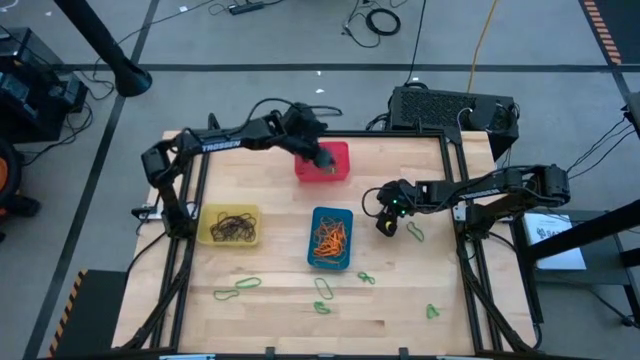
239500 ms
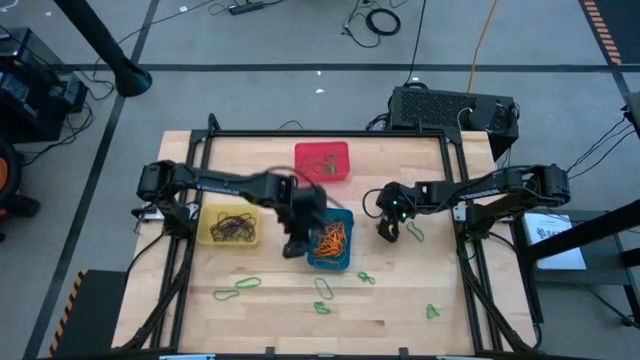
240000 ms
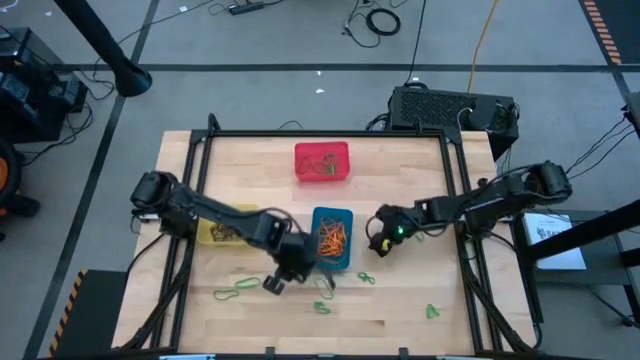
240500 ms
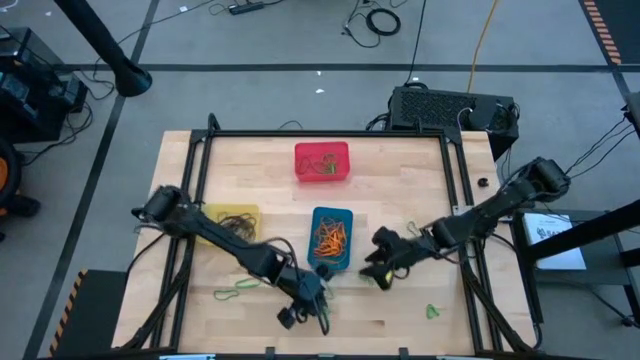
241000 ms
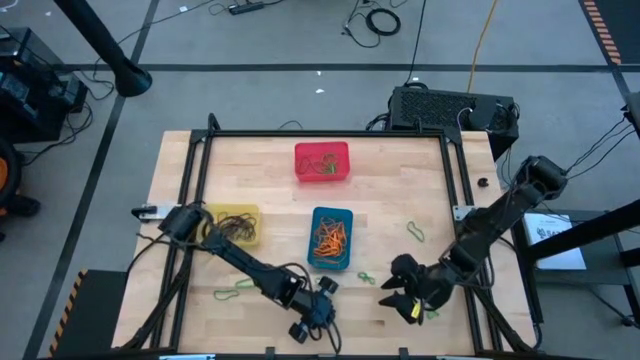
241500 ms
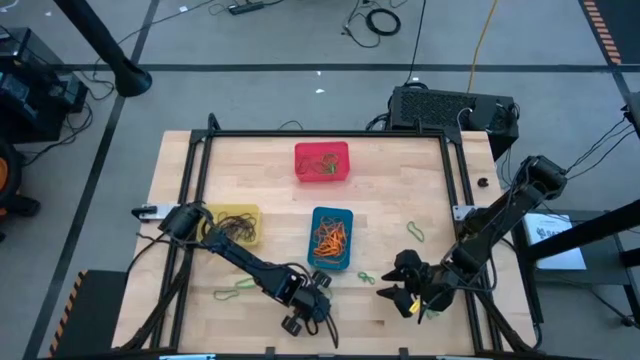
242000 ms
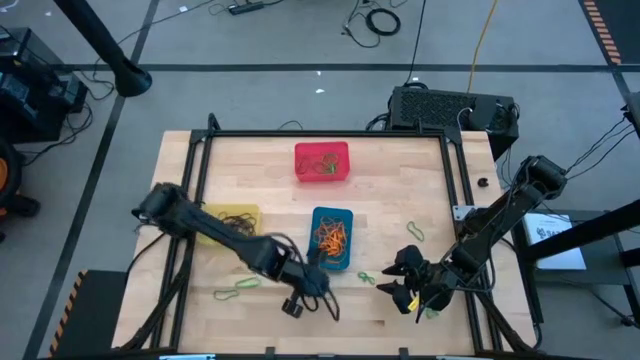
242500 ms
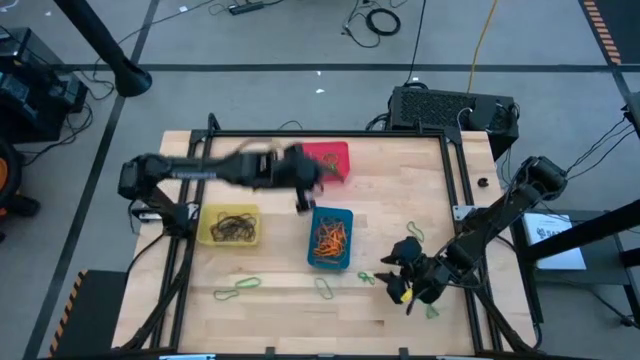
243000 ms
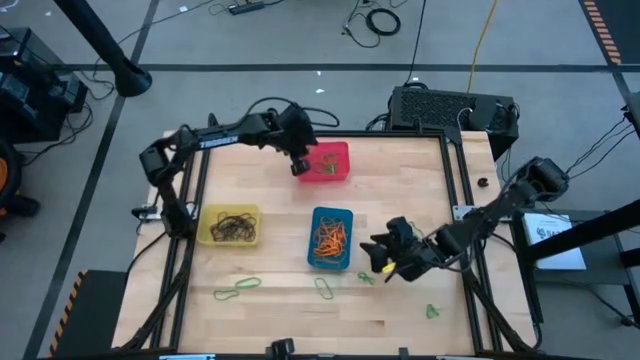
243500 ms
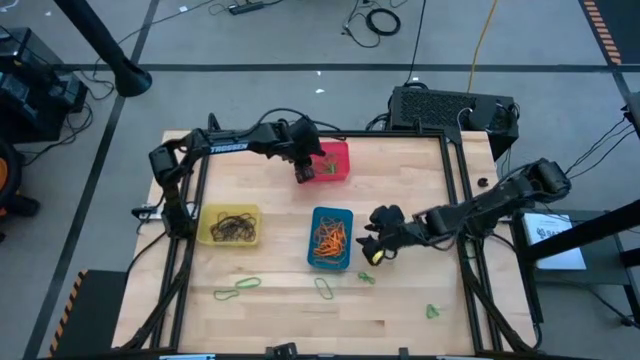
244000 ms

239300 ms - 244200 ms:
Task: Sort rubber bands into baskets
Put the green rubber band into the red bin

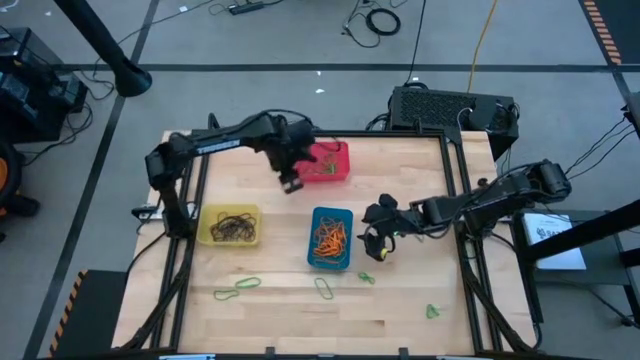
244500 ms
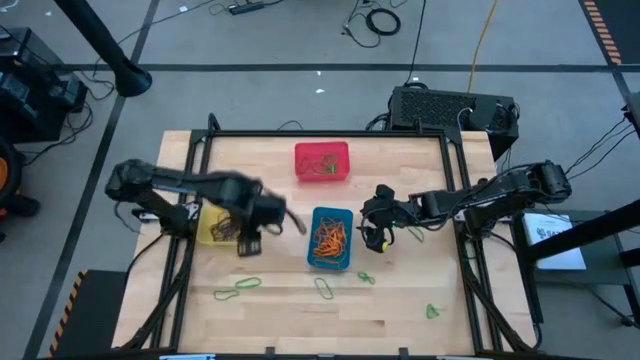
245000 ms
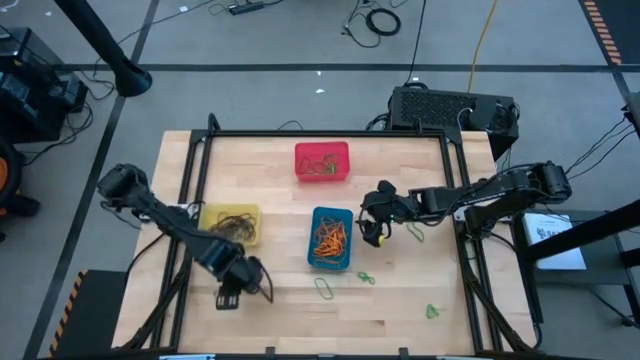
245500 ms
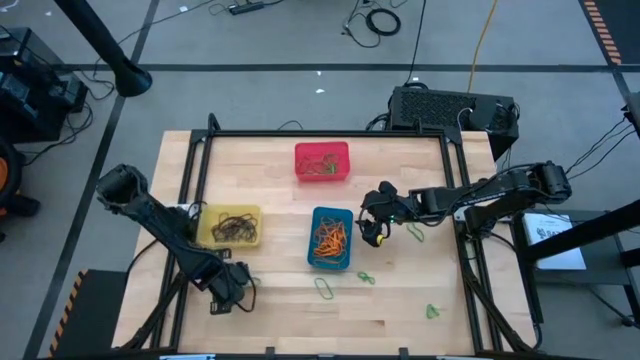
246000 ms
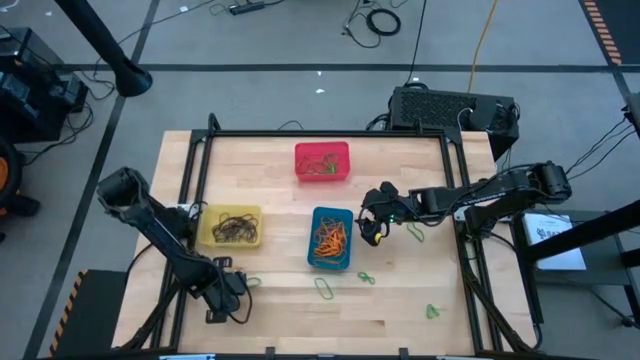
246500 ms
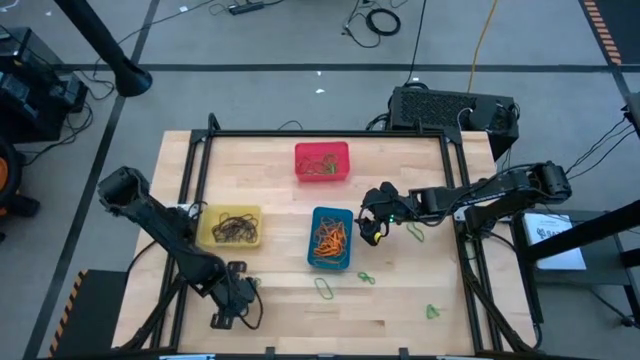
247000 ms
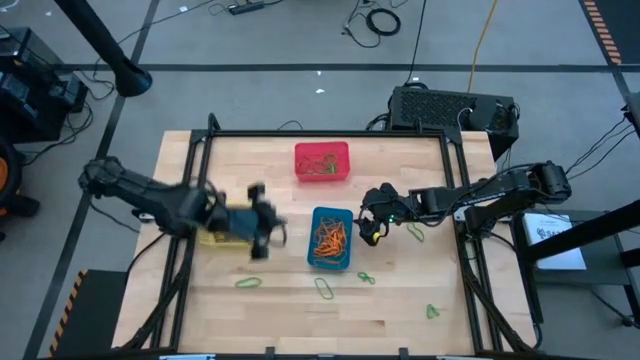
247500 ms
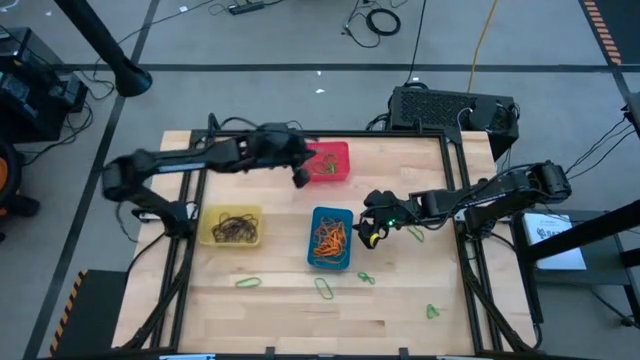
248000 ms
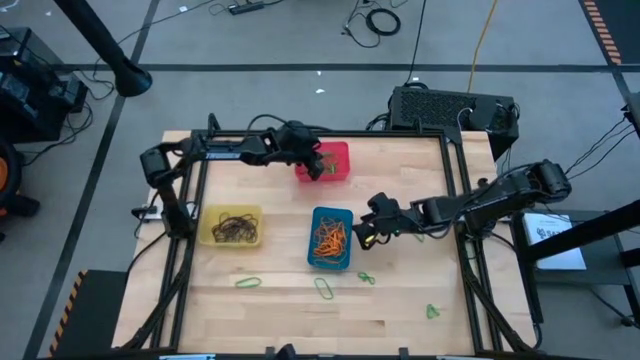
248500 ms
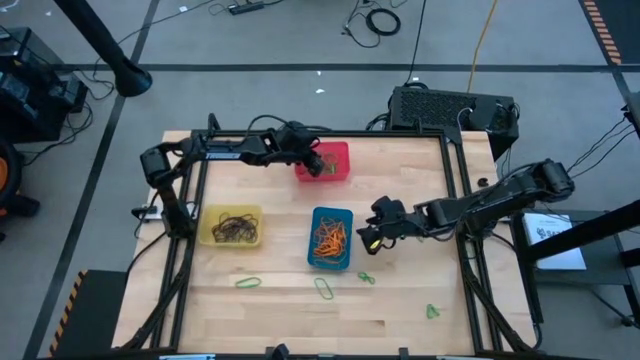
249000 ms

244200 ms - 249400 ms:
Put the green rubber band into the red bin

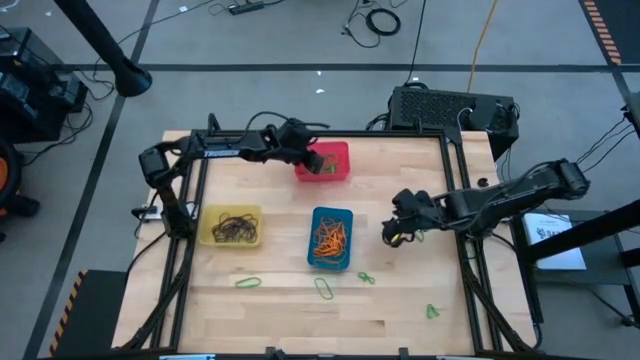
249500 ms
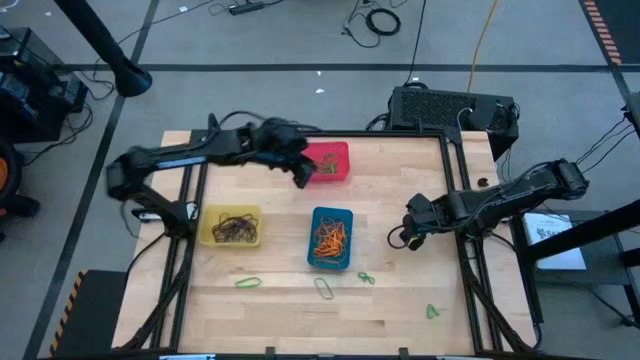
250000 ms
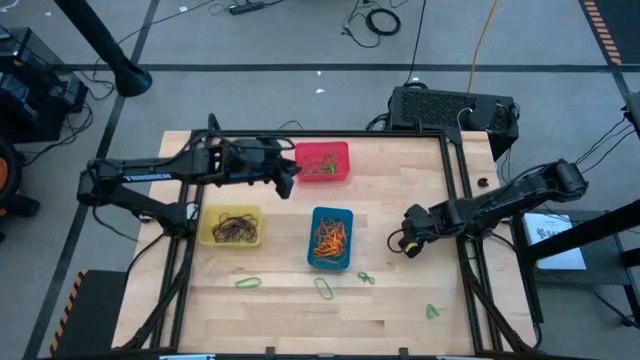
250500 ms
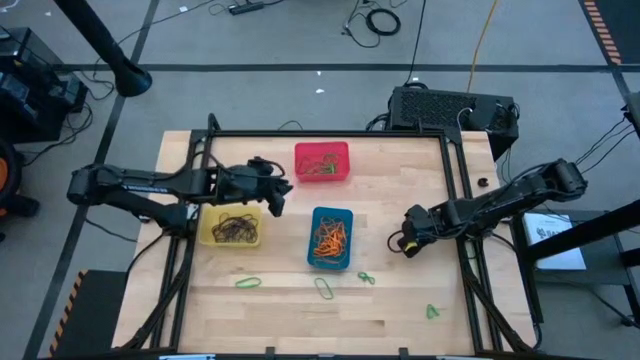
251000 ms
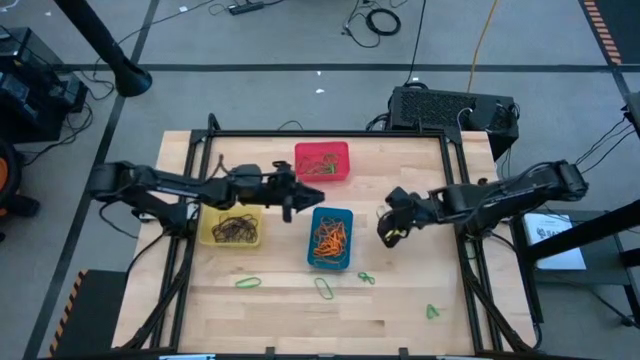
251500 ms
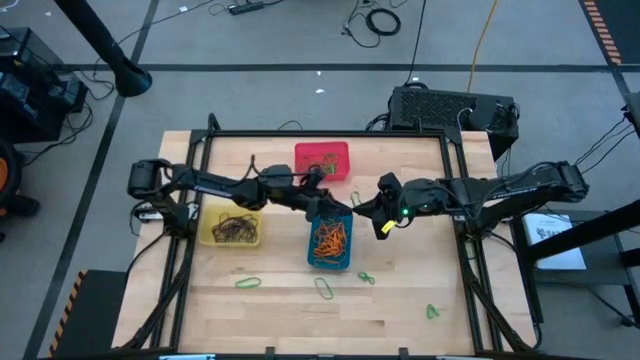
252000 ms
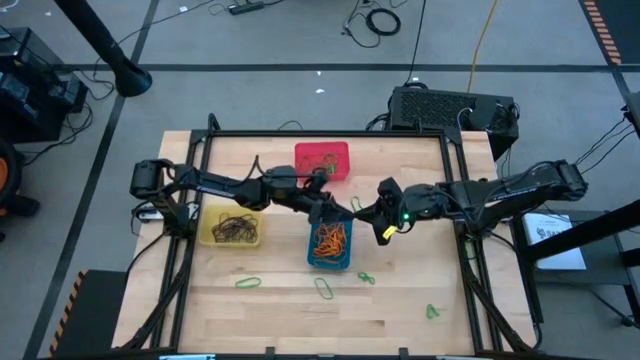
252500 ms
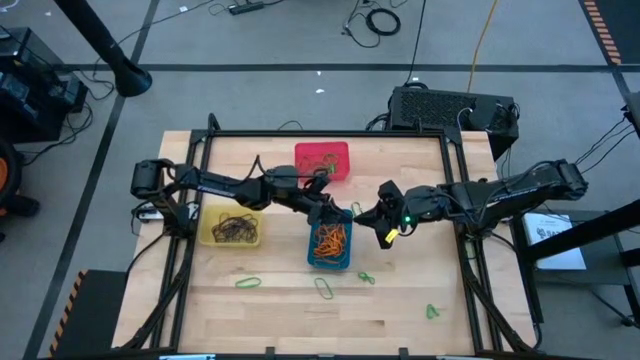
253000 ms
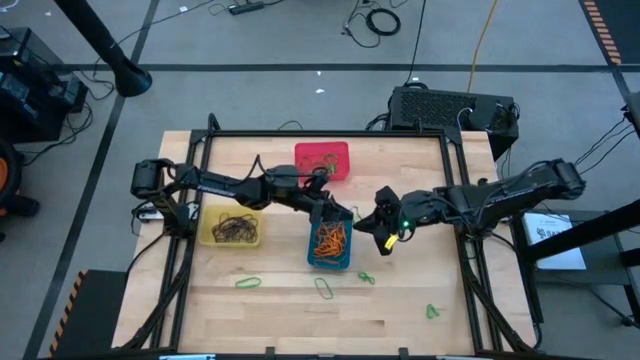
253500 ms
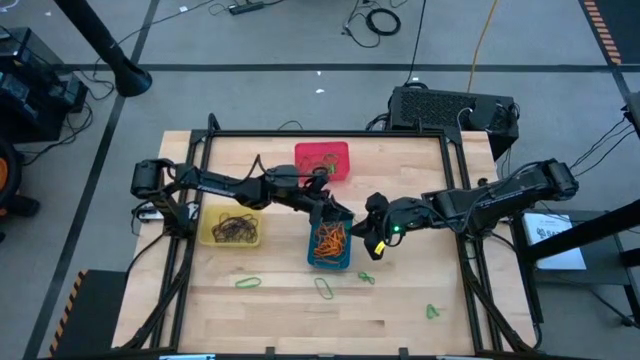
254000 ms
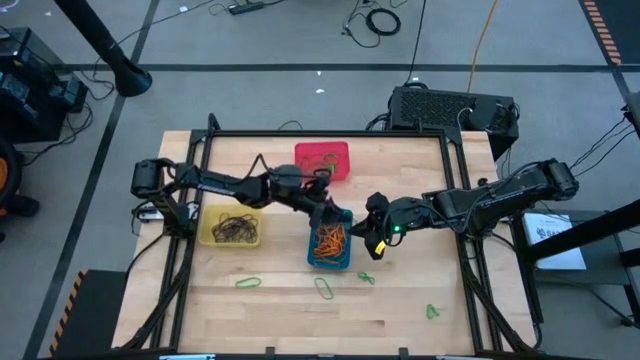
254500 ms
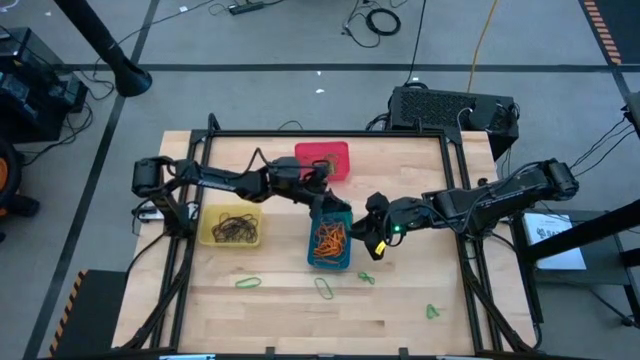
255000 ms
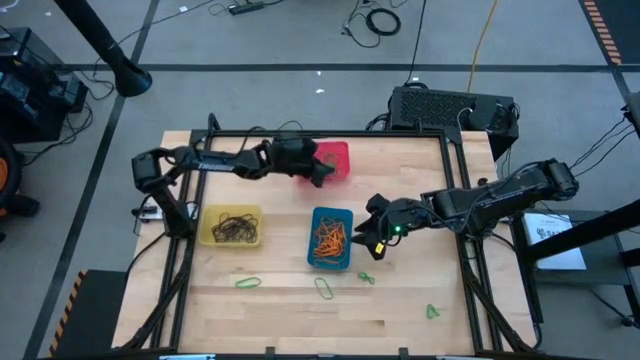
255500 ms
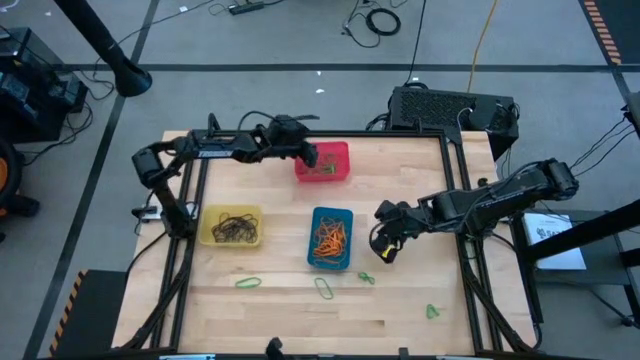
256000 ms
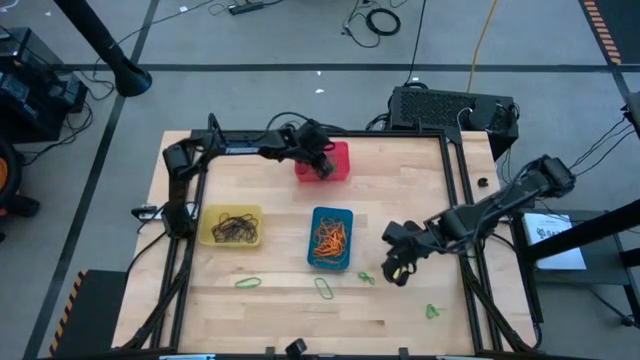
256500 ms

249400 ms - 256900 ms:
Put the green rubber band into the red bin

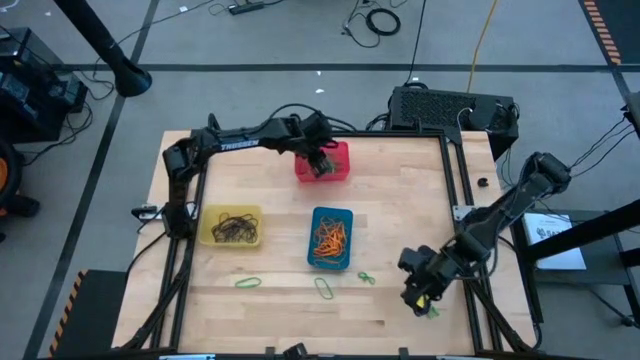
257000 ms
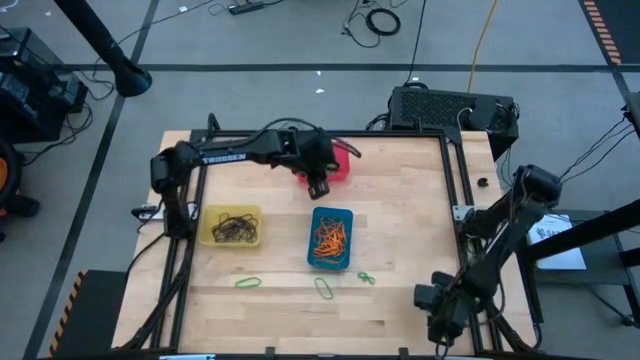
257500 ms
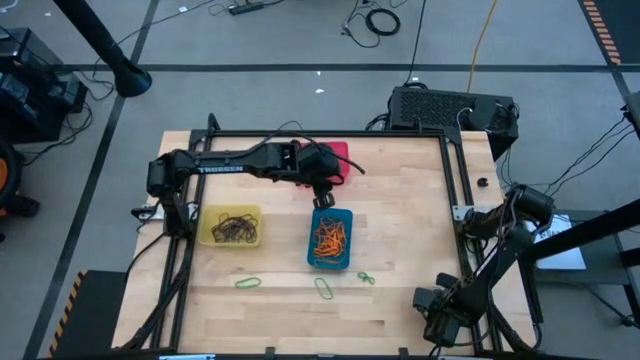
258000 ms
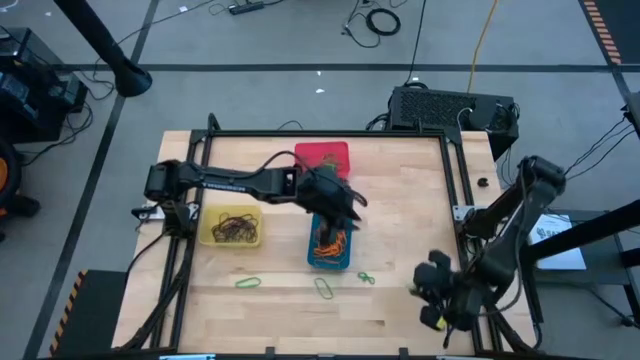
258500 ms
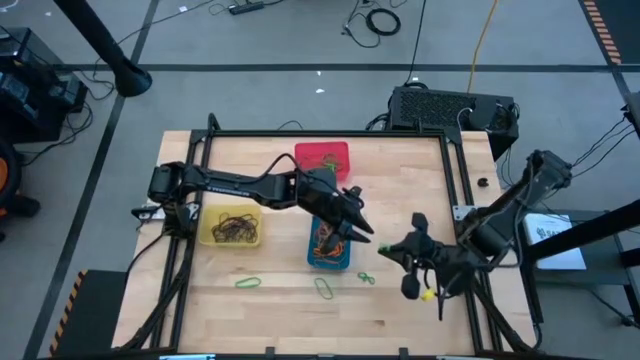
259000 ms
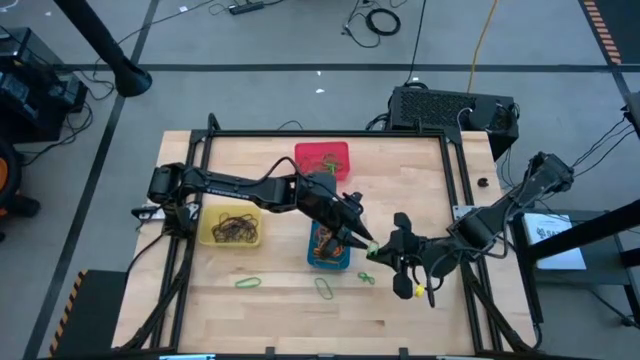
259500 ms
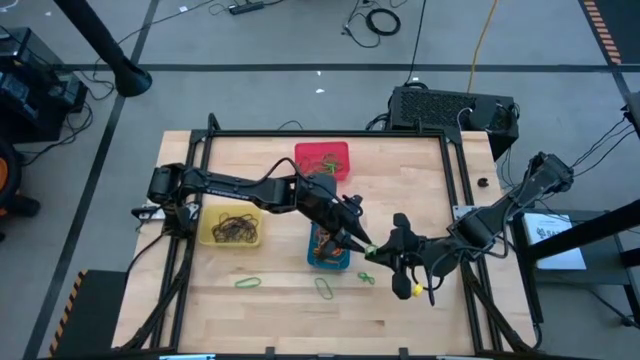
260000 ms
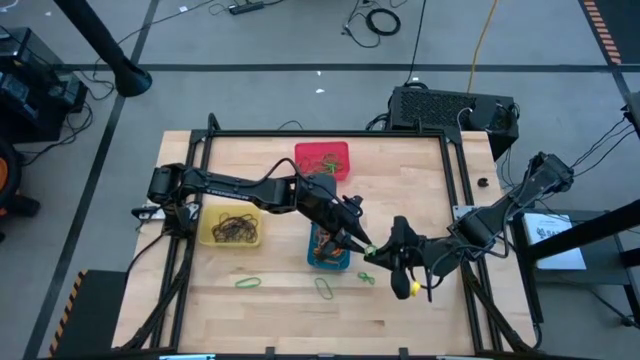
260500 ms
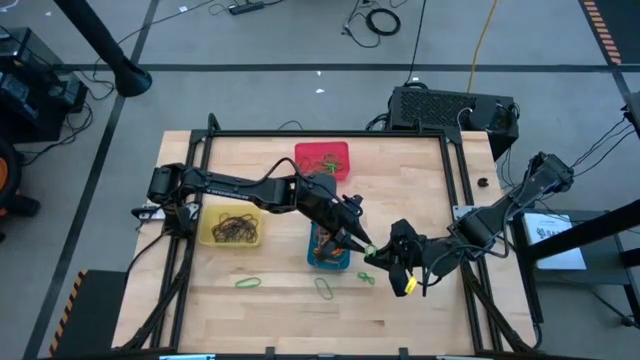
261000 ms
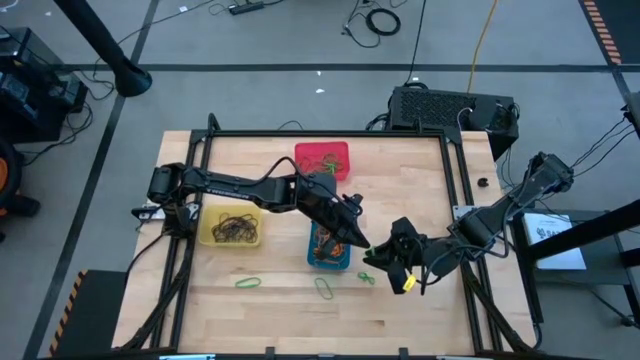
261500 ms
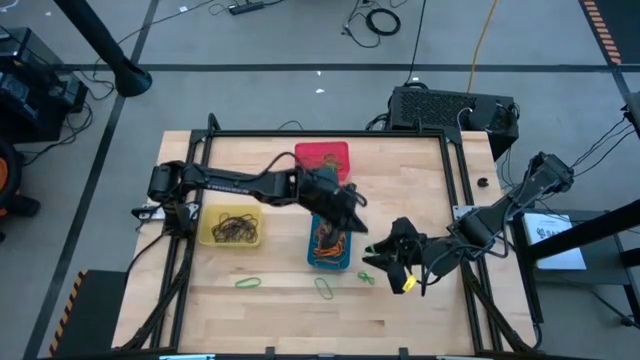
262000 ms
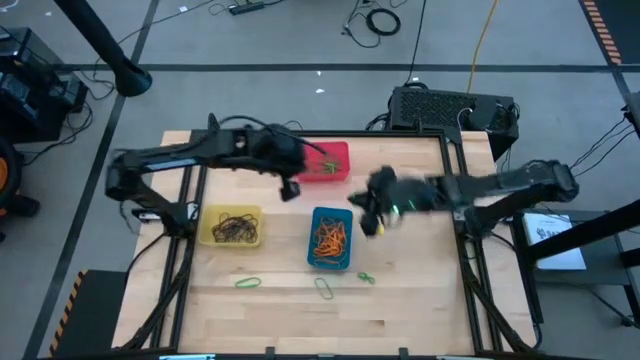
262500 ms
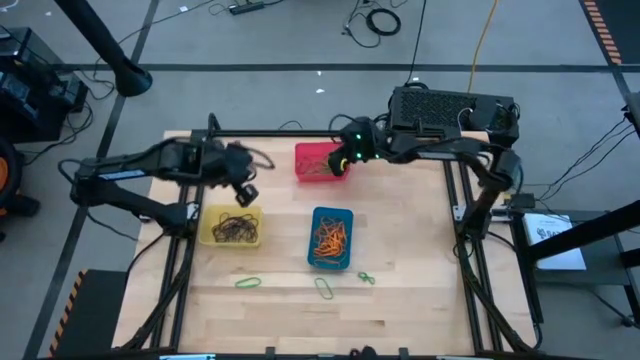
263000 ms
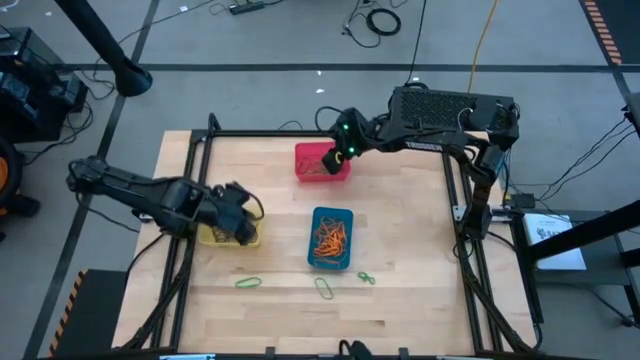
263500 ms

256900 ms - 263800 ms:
Put the green rubber band into the red bin
